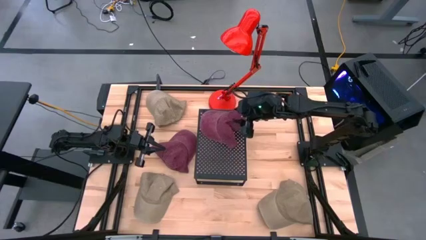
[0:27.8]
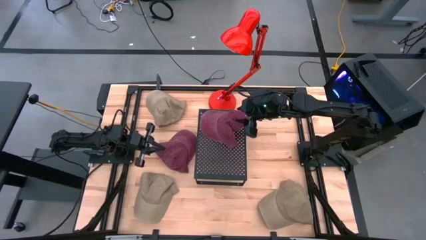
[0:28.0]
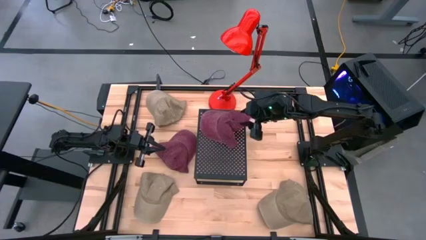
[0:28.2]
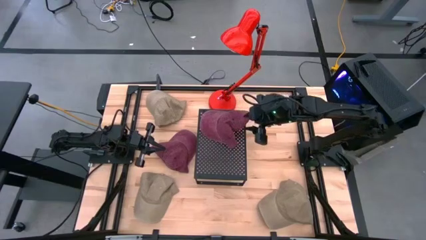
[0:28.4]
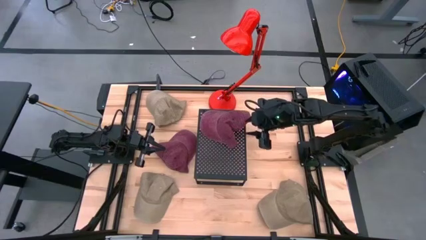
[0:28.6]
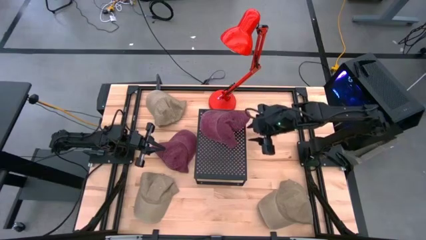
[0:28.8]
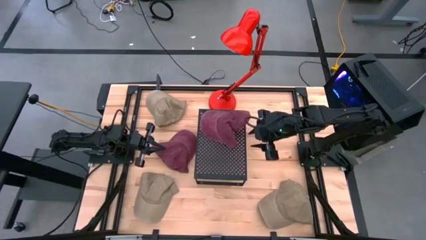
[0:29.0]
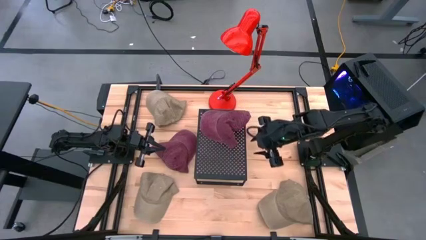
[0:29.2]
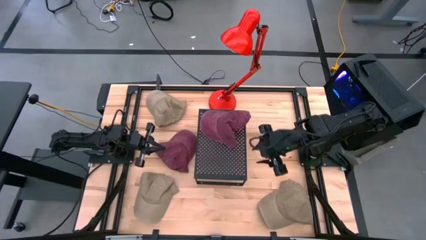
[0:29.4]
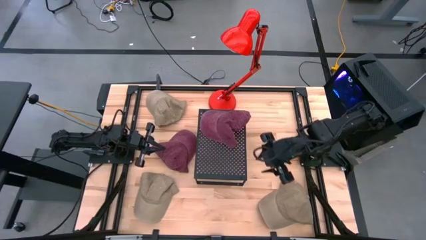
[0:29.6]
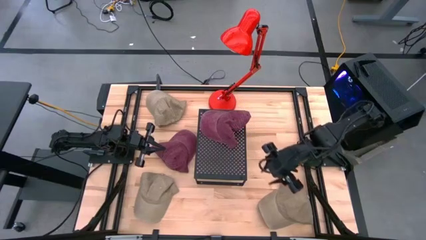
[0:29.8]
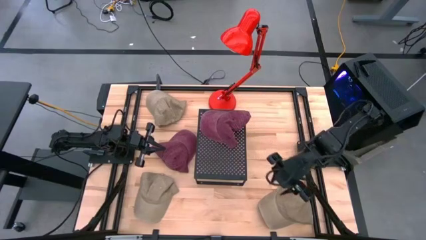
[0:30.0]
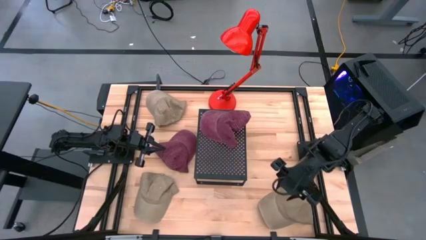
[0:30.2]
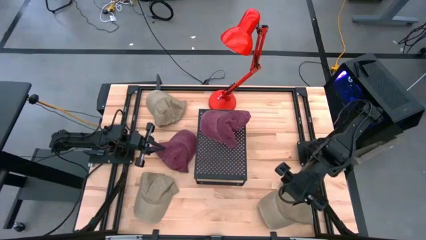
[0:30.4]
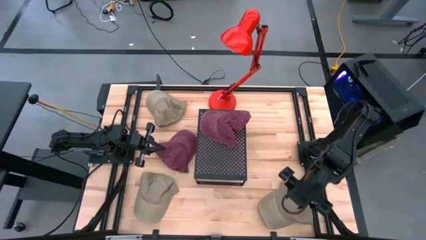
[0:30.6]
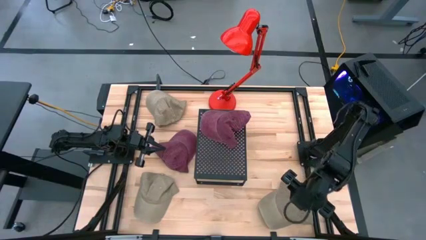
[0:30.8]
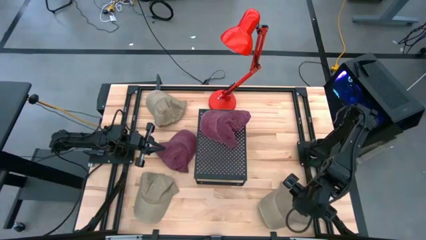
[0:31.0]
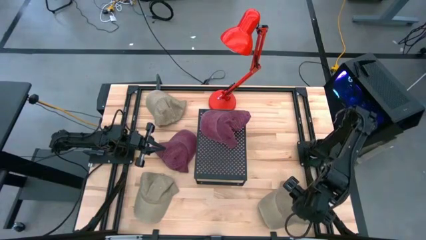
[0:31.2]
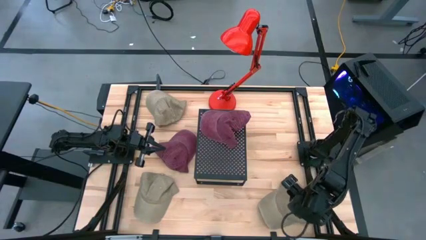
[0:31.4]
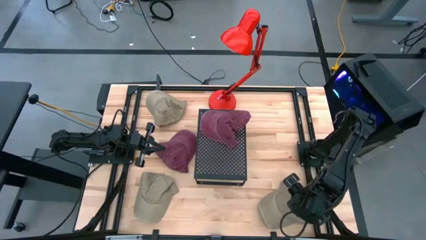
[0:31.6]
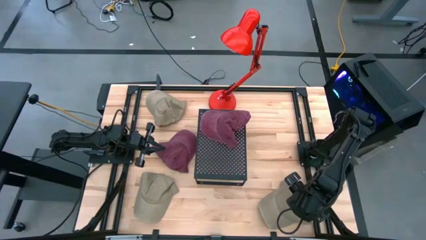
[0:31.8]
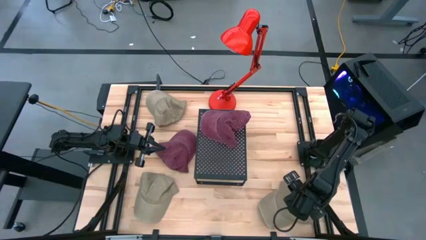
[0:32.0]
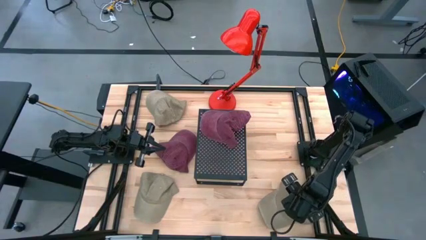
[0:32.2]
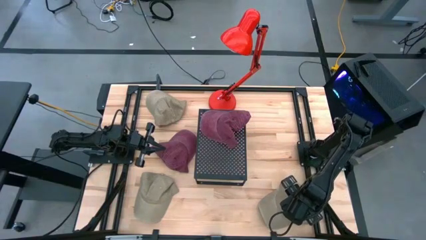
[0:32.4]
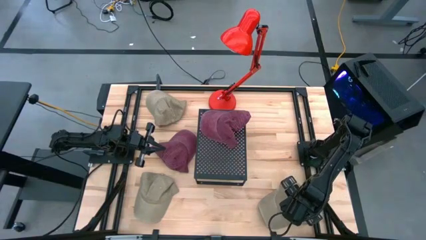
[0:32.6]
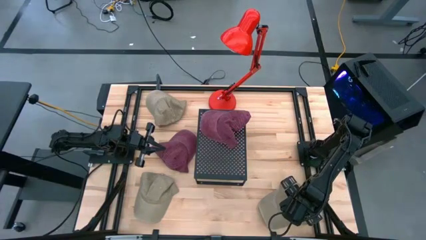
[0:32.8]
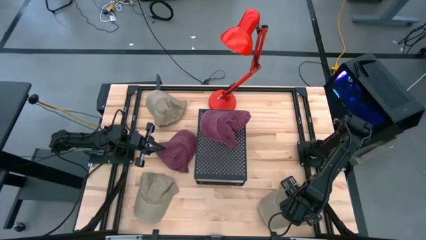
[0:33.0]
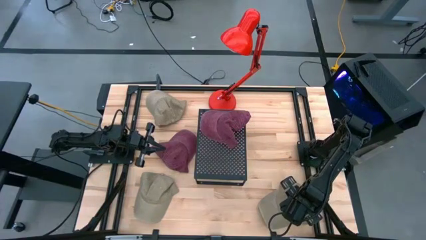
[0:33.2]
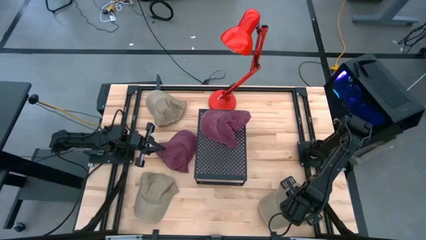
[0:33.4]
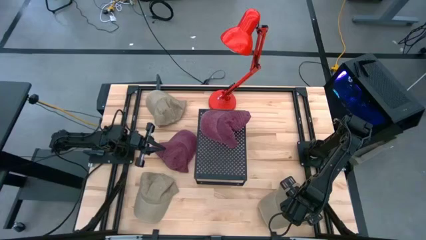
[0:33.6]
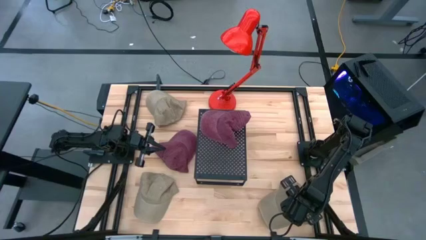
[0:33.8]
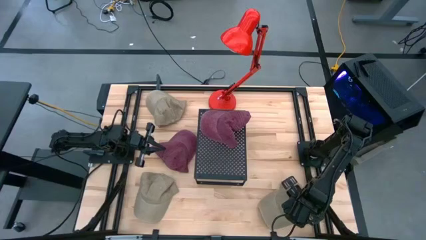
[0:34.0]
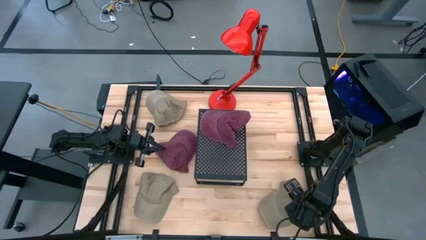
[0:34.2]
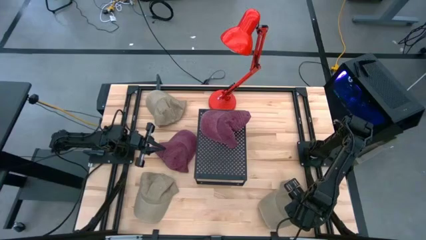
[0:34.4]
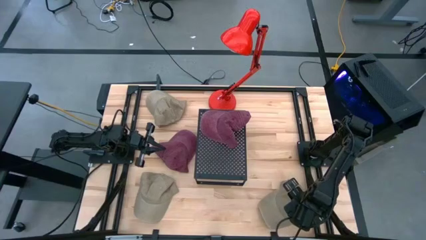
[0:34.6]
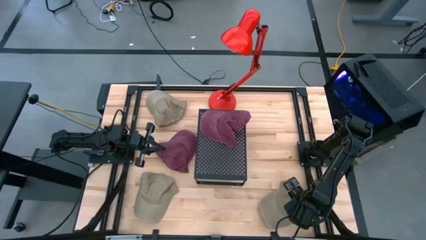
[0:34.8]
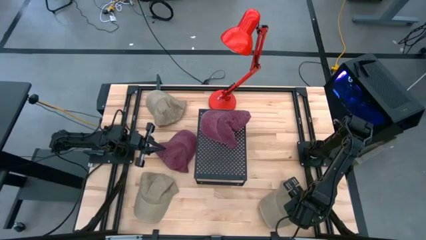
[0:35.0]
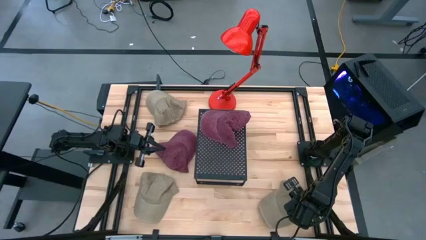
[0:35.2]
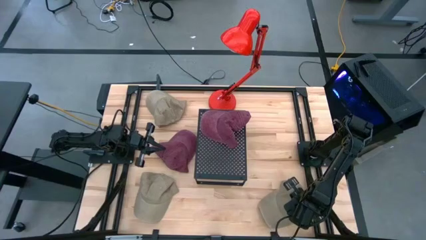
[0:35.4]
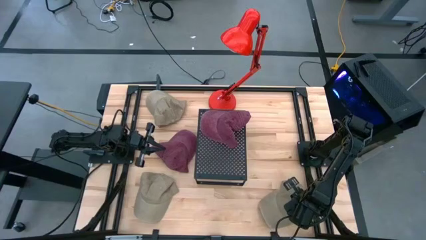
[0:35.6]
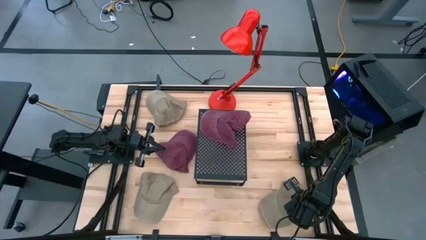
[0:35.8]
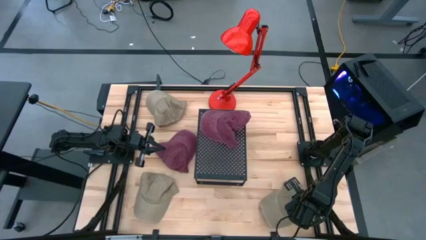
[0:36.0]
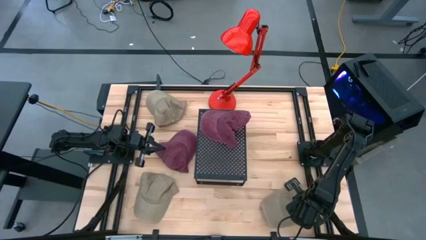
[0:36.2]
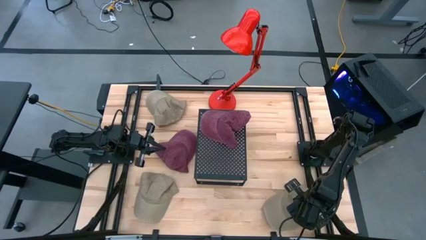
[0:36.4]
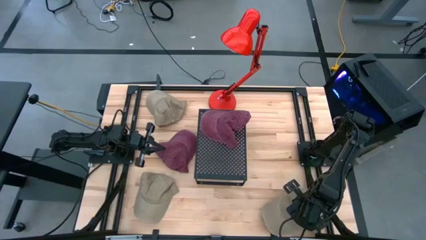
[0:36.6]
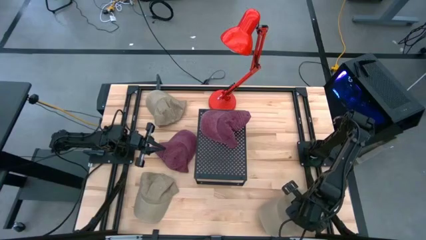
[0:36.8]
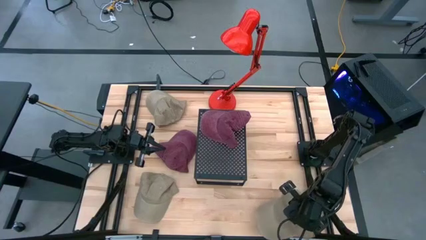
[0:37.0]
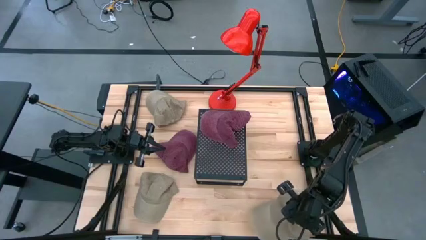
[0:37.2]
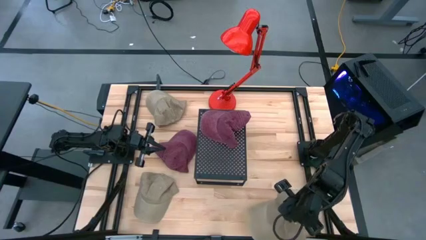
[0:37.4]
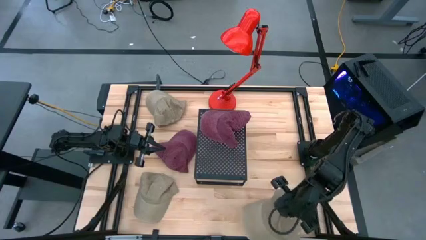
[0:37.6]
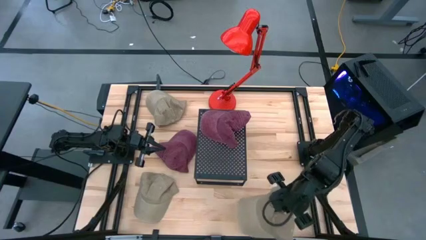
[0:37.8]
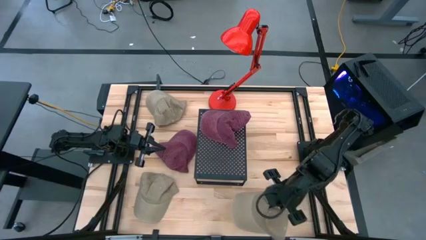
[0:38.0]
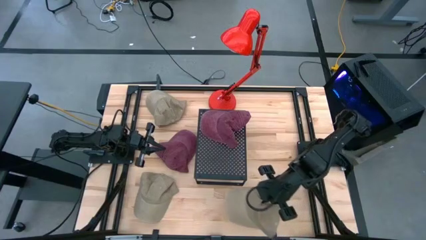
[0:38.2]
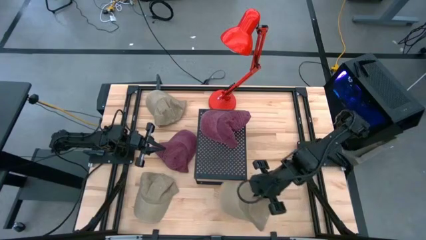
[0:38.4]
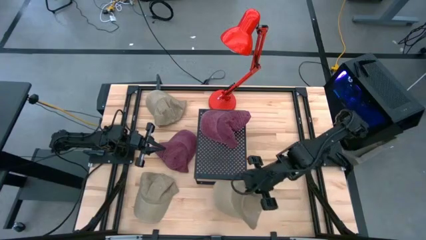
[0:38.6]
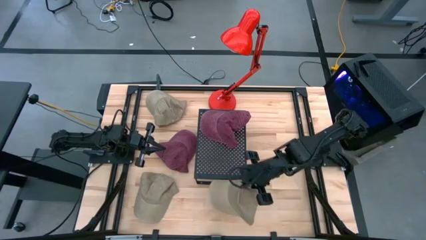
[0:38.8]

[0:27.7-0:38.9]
Task: Pick & Place hat
Put the bottom right brown cap on the shelf
